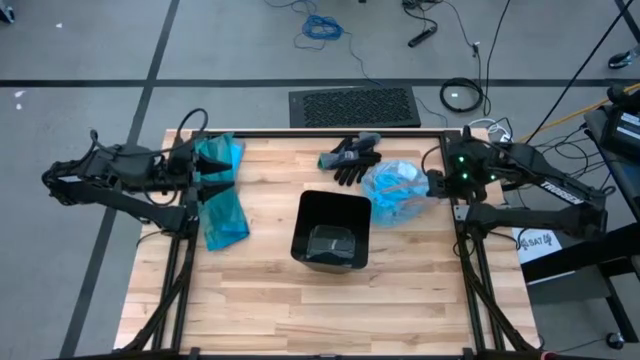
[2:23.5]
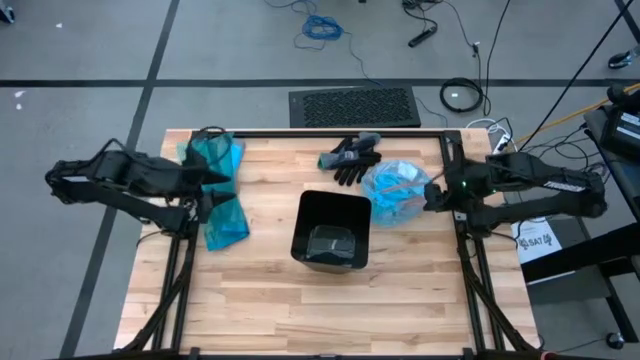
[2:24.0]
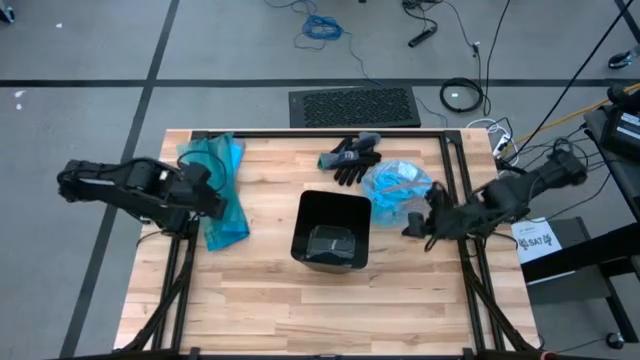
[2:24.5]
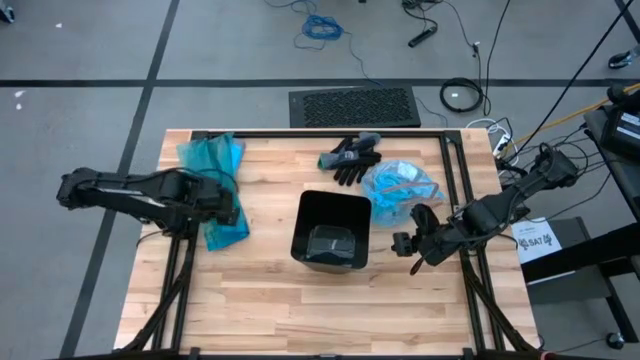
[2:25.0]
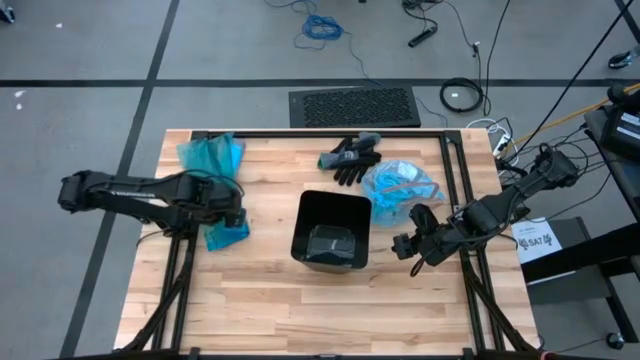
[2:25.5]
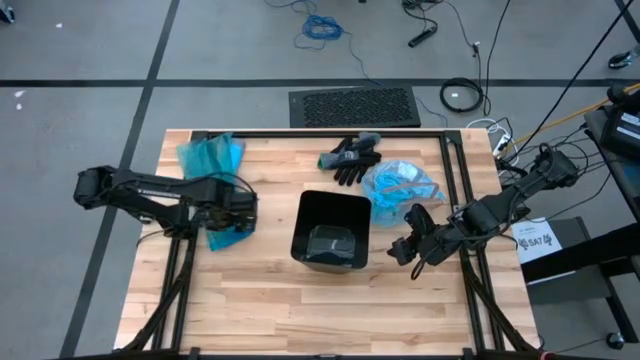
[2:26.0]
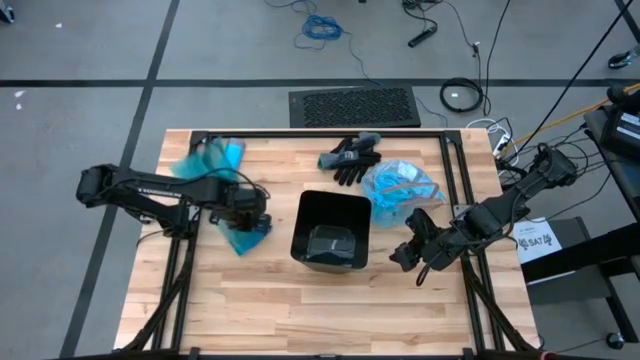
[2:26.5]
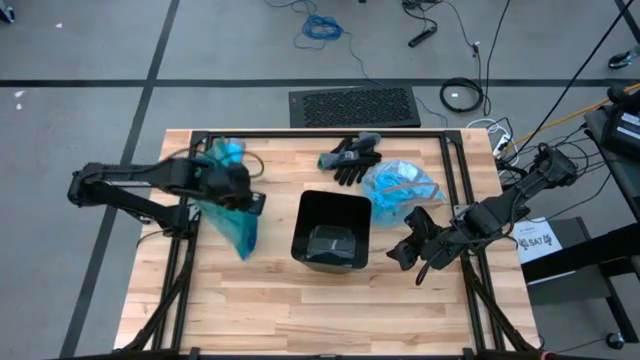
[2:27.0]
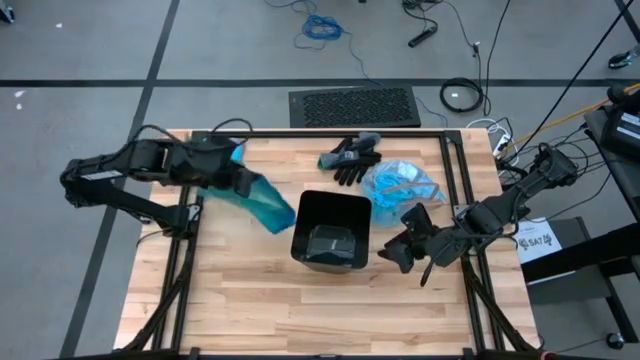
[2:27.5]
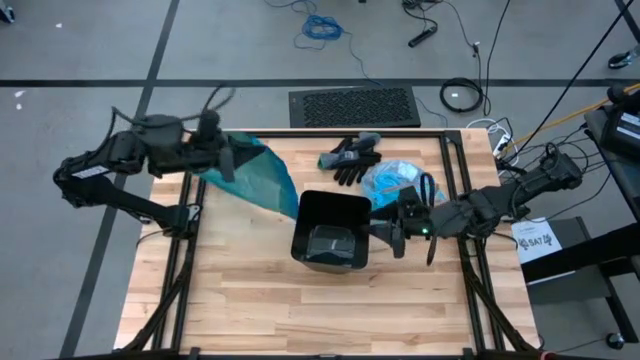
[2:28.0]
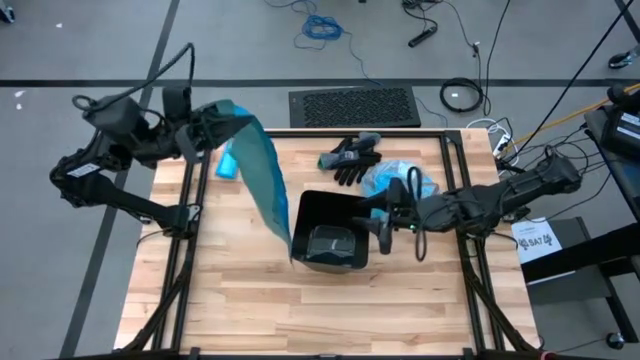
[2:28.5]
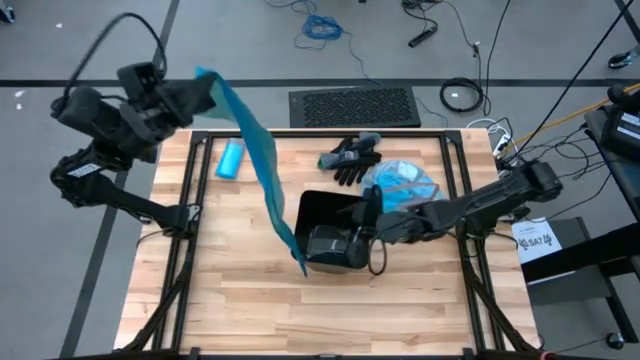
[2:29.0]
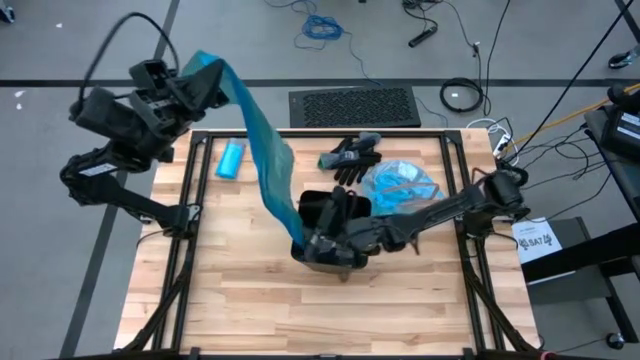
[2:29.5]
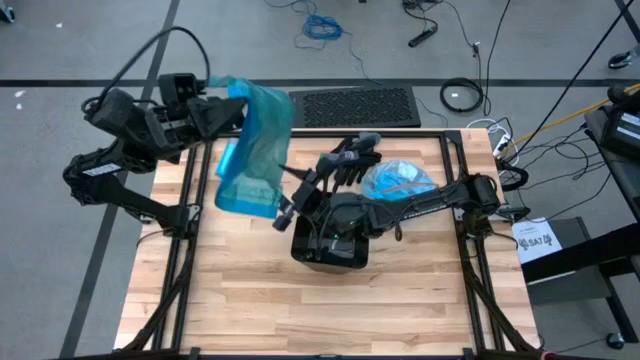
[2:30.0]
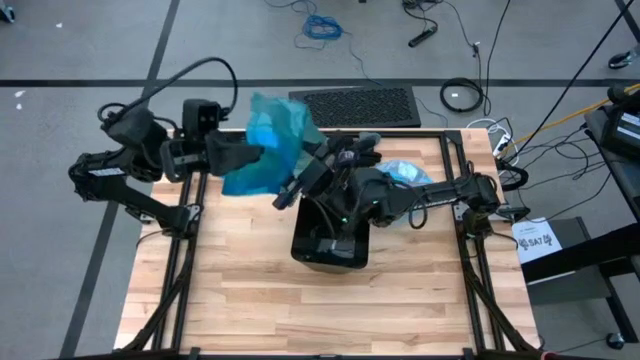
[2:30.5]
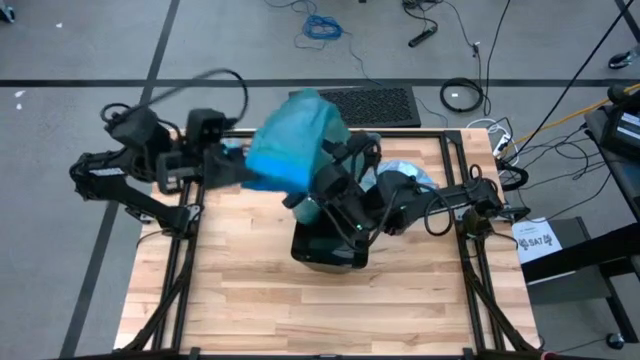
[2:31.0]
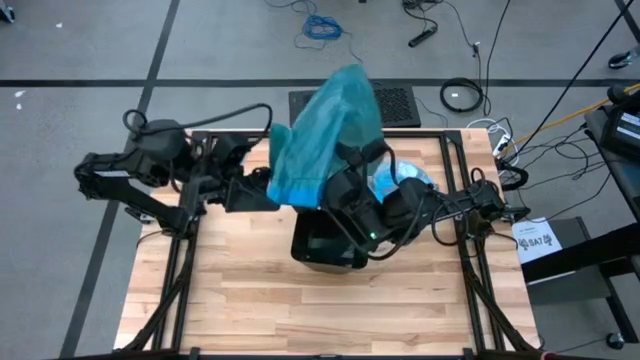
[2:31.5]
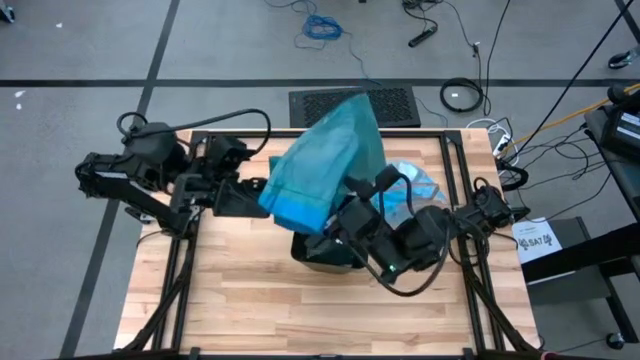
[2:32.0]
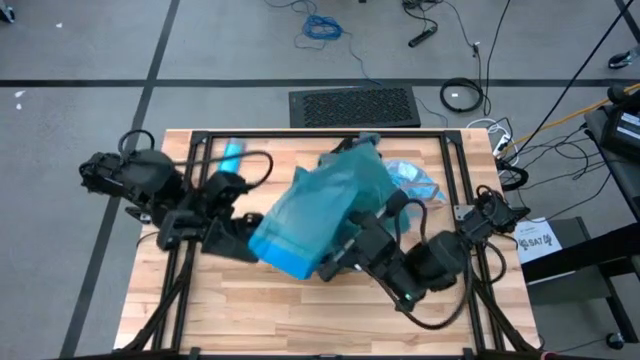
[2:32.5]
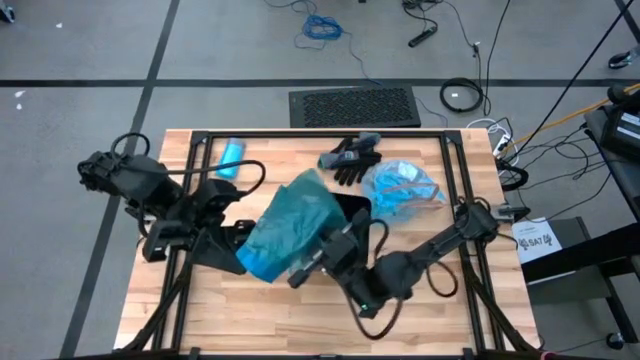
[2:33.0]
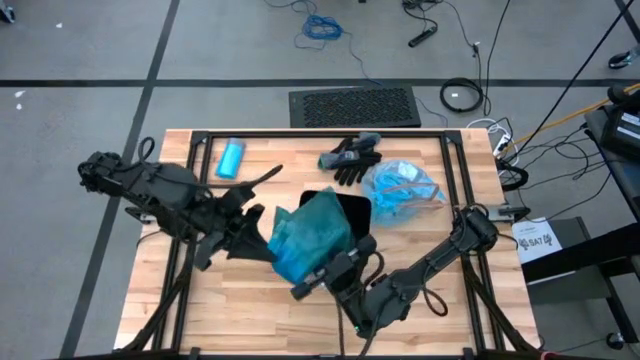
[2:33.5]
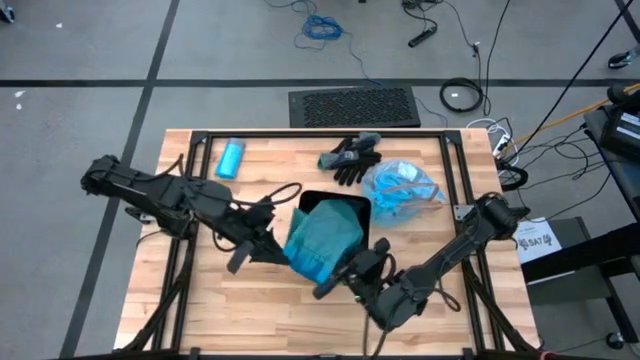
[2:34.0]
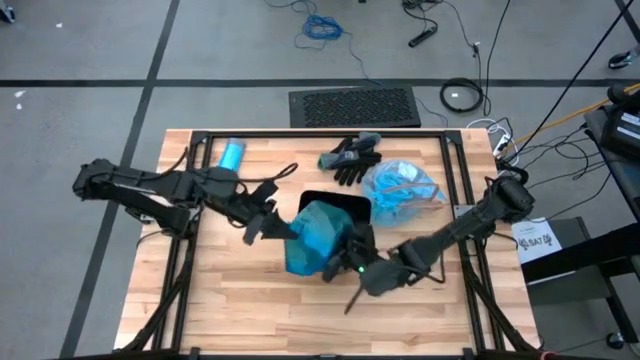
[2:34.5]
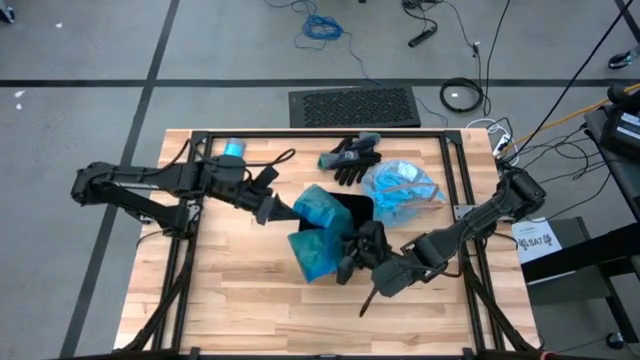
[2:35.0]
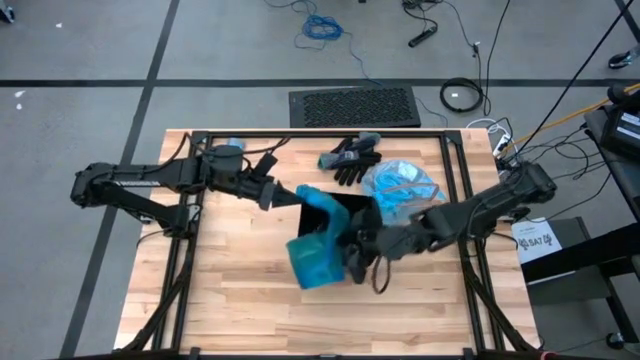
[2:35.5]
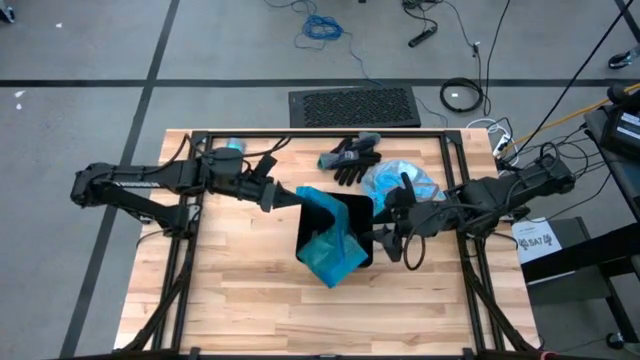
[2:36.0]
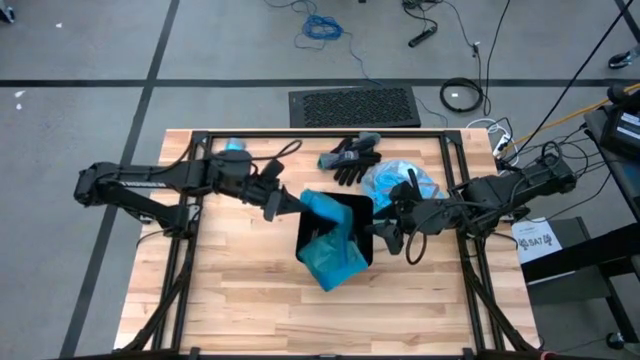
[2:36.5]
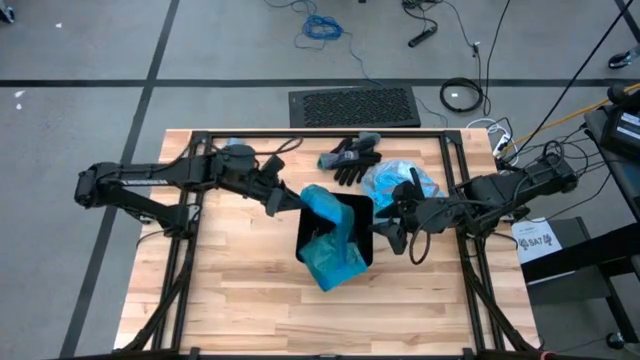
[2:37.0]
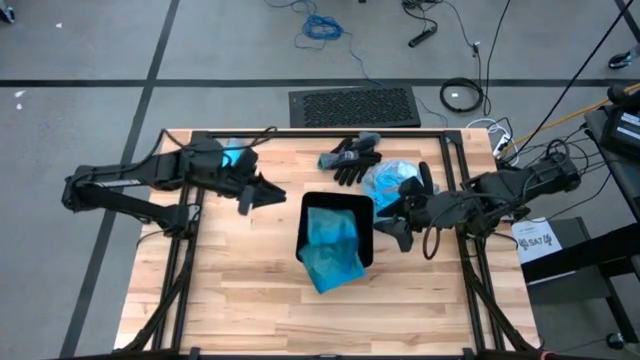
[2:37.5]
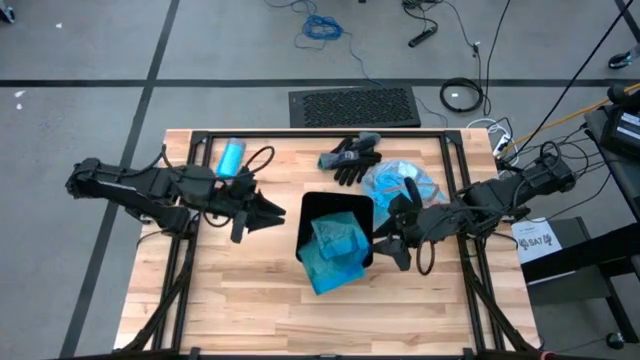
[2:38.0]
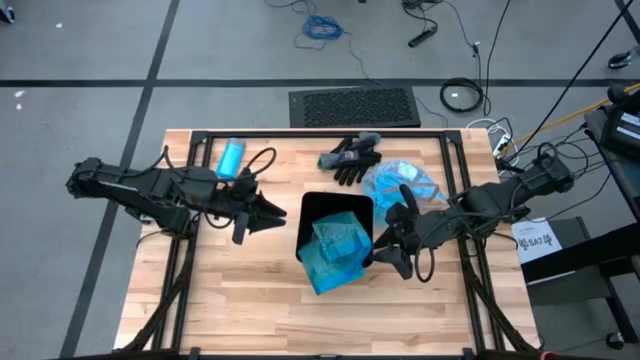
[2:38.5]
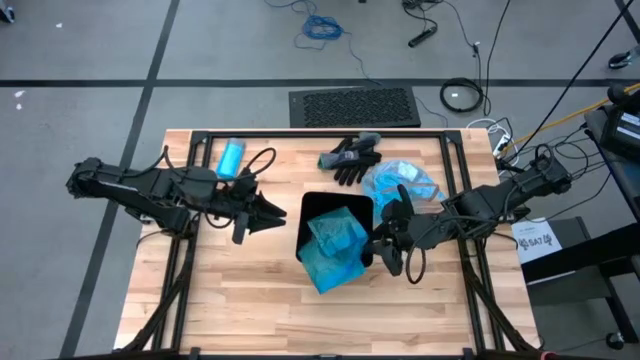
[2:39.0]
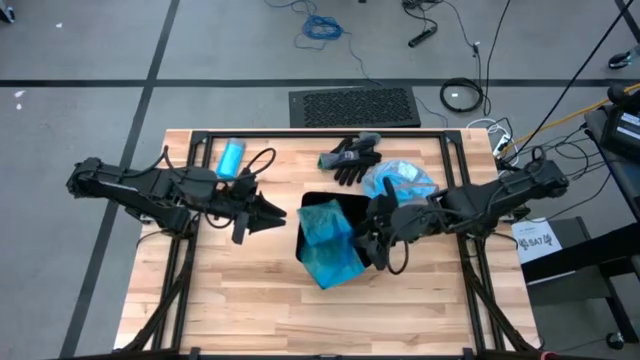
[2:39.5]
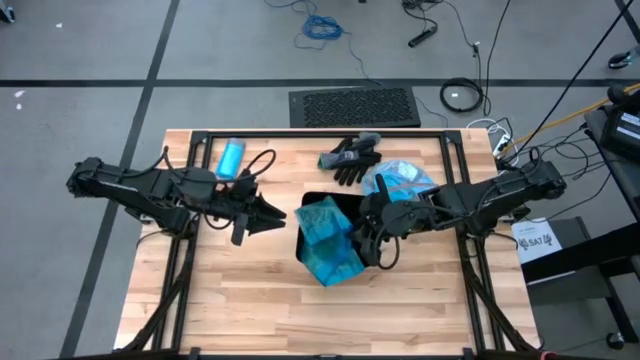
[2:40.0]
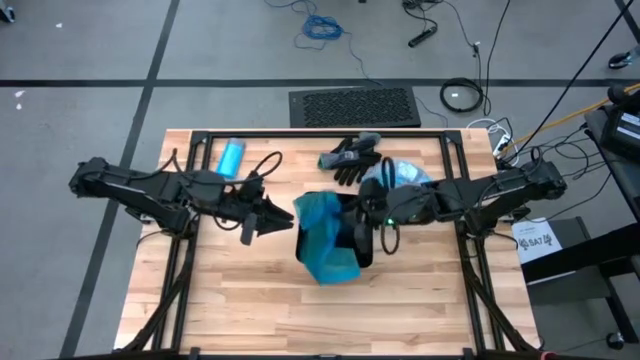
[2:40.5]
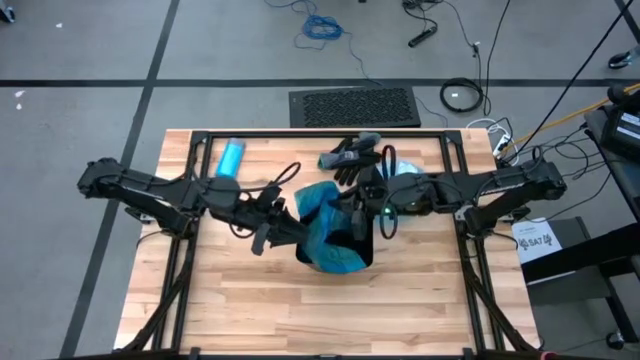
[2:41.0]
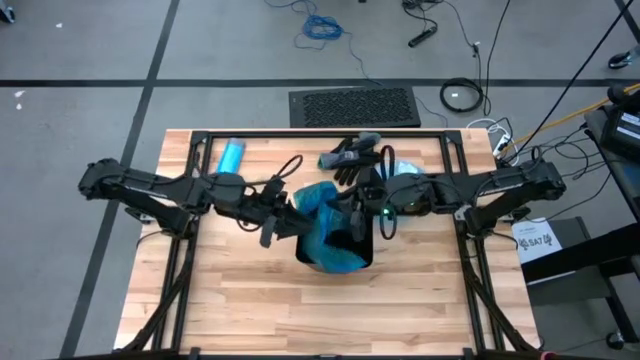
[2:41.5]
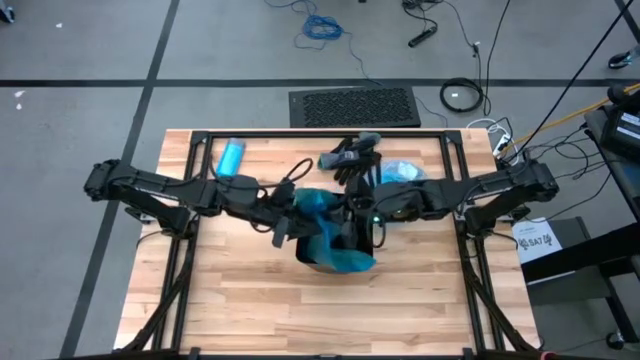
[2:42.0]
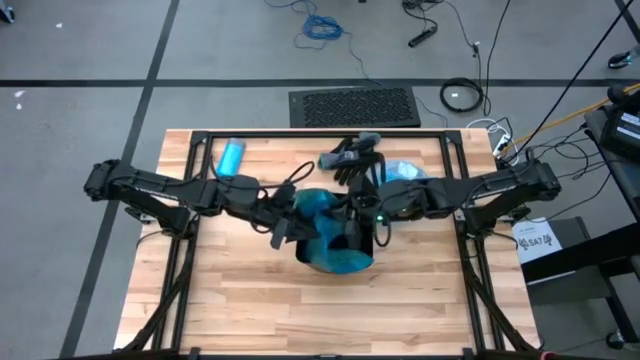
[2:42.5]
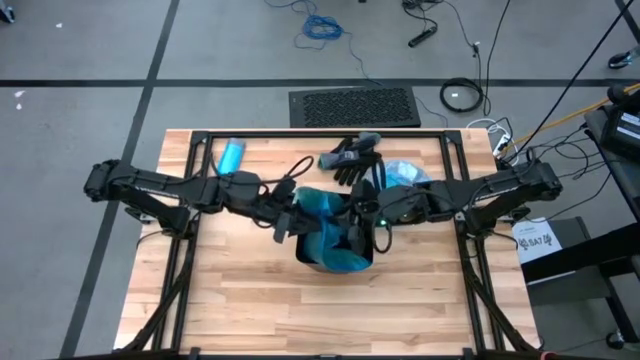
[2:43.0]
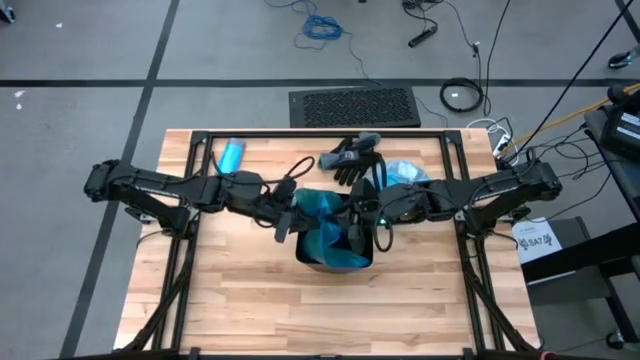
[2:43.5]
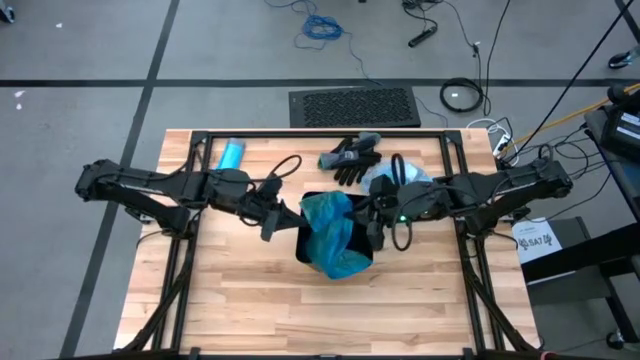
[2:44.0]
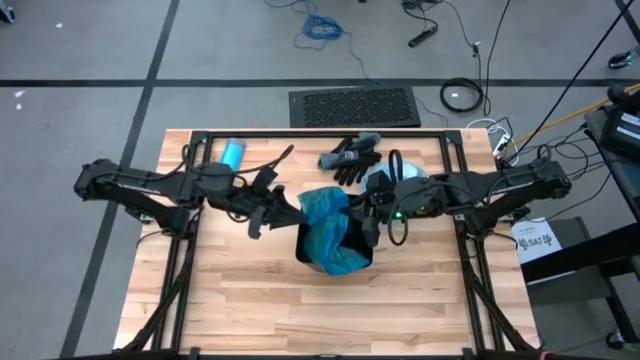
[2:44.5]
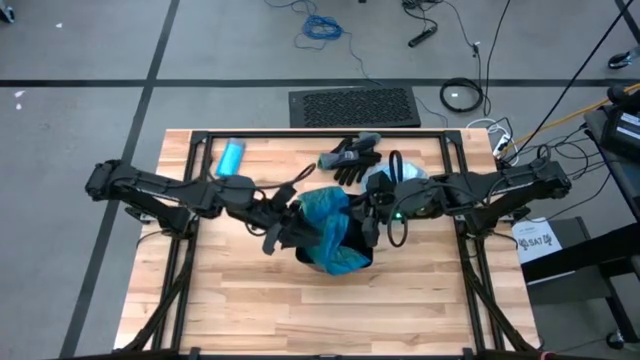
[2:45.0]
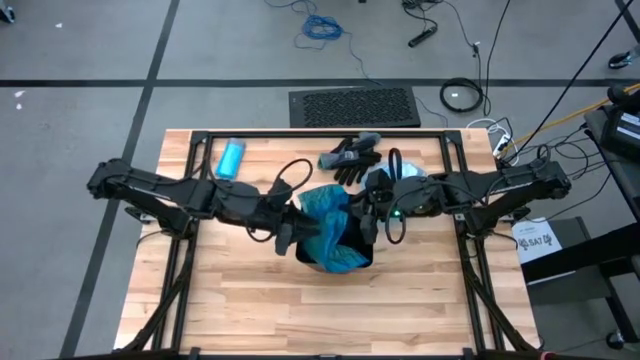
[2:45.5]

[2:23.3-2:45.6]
Task: place trash/remove bag and relplace
Put the blue trash bag into the black trash bin
